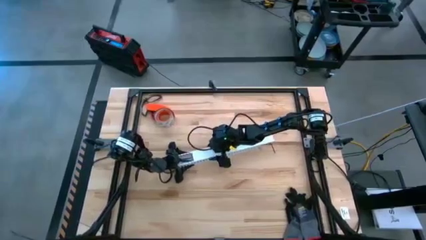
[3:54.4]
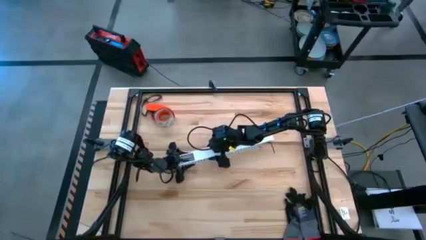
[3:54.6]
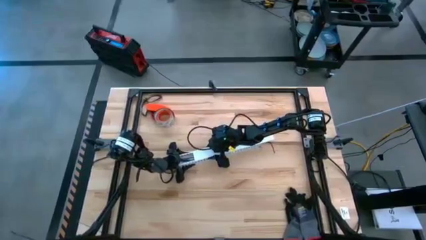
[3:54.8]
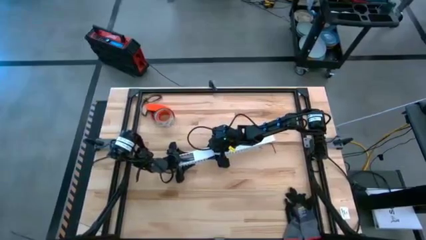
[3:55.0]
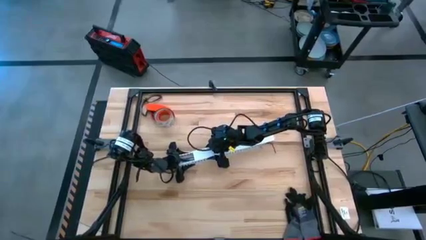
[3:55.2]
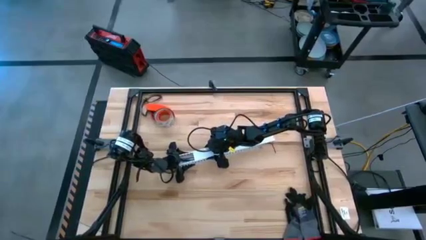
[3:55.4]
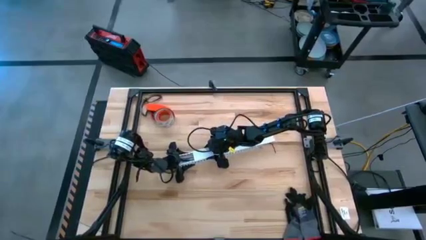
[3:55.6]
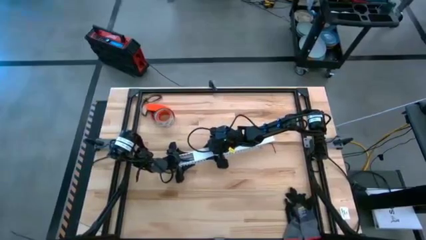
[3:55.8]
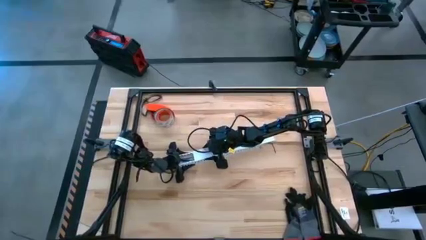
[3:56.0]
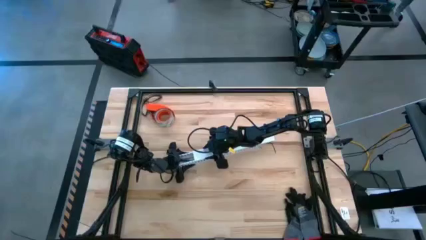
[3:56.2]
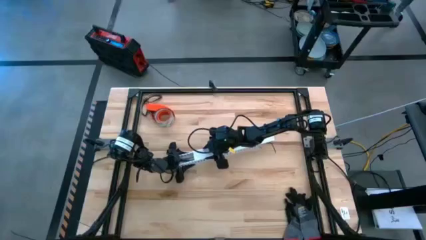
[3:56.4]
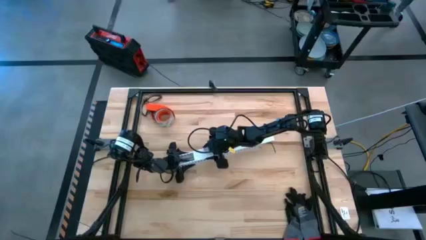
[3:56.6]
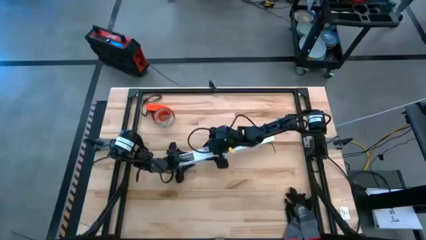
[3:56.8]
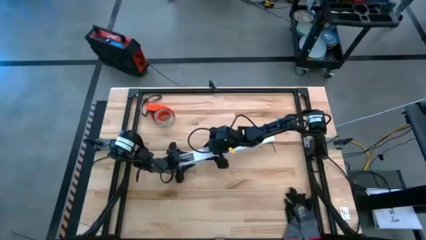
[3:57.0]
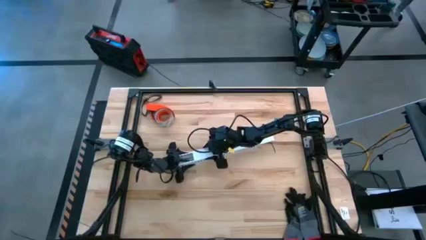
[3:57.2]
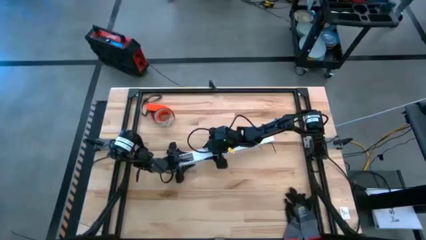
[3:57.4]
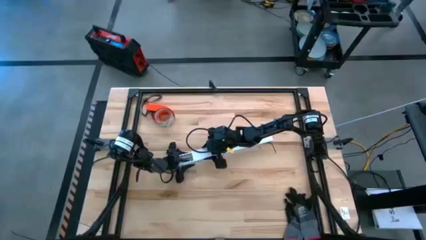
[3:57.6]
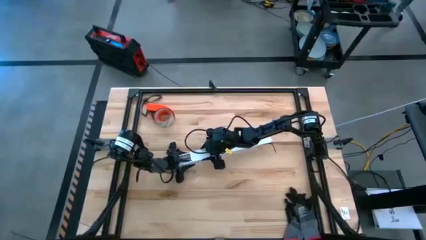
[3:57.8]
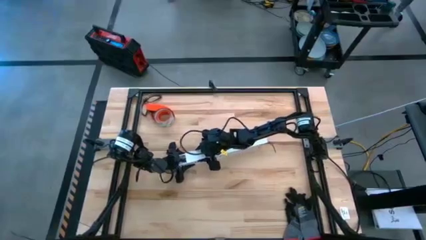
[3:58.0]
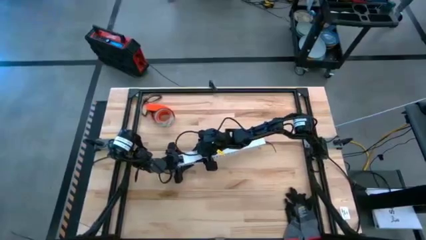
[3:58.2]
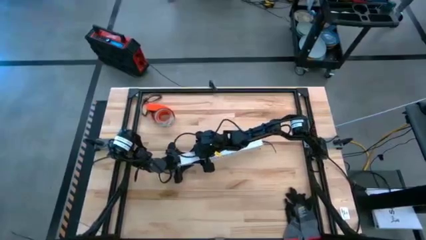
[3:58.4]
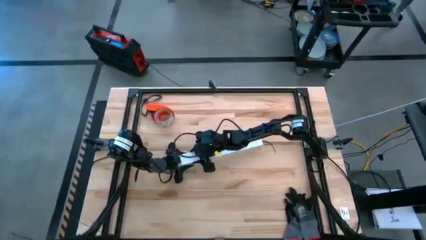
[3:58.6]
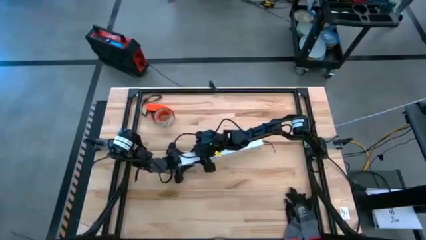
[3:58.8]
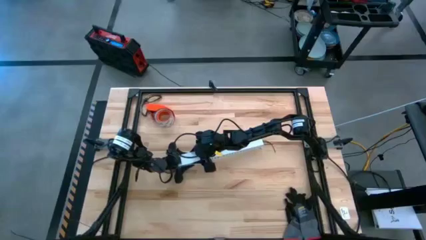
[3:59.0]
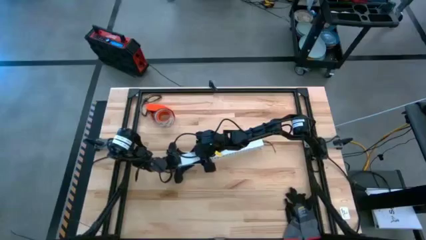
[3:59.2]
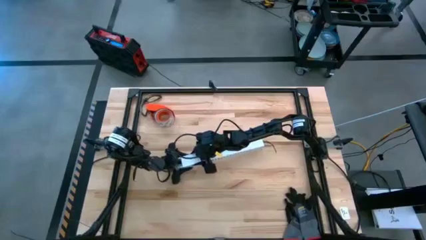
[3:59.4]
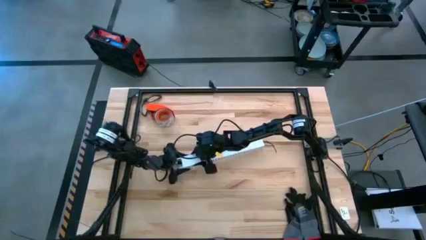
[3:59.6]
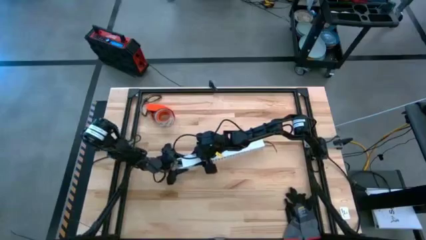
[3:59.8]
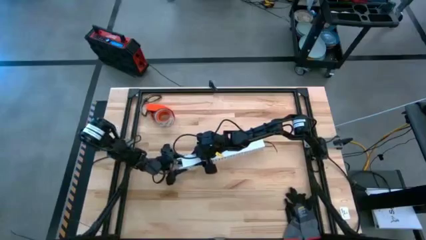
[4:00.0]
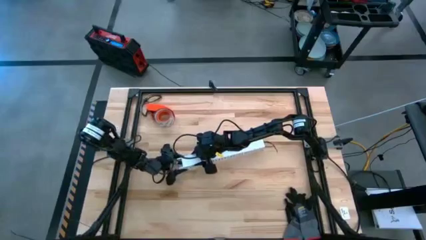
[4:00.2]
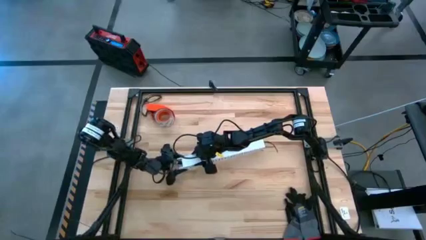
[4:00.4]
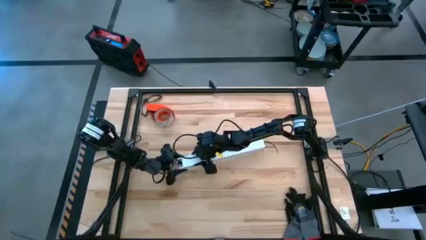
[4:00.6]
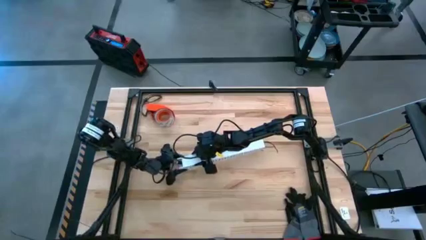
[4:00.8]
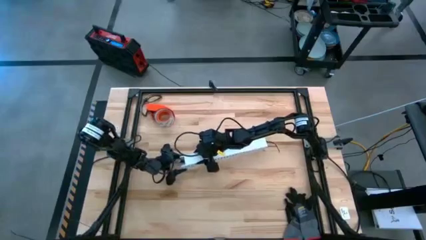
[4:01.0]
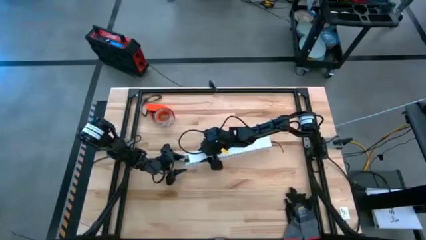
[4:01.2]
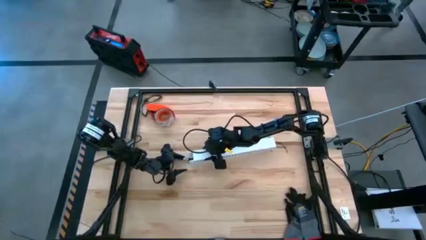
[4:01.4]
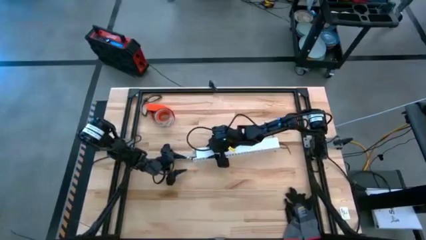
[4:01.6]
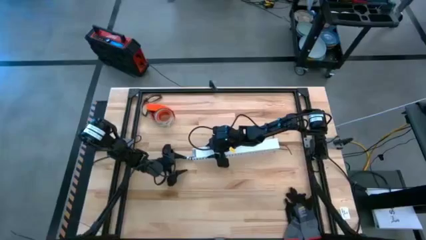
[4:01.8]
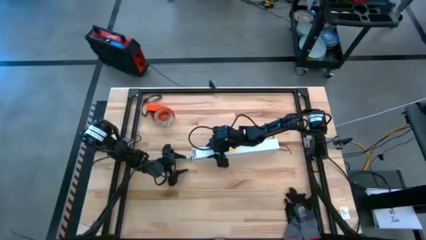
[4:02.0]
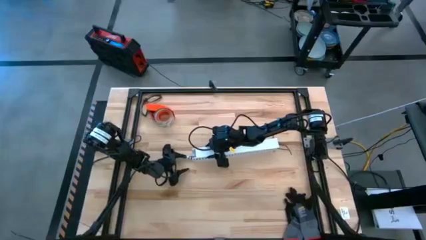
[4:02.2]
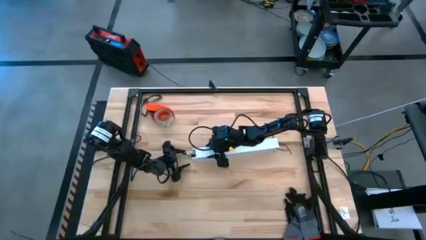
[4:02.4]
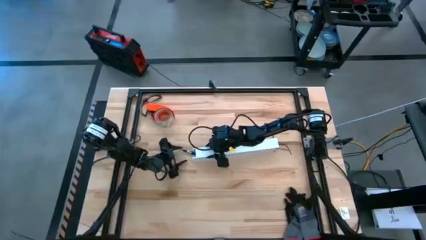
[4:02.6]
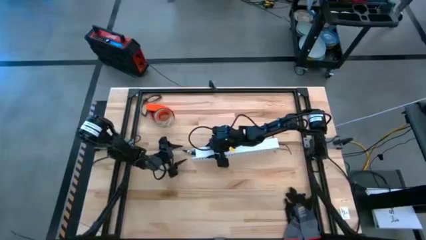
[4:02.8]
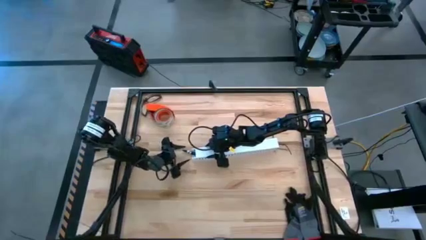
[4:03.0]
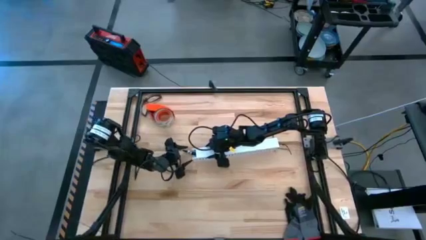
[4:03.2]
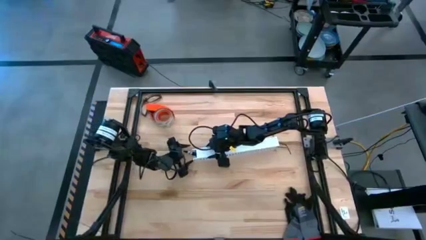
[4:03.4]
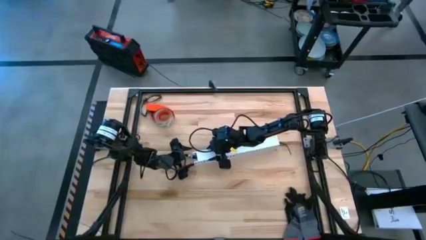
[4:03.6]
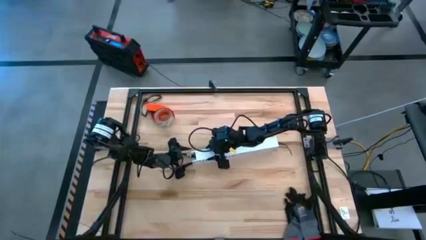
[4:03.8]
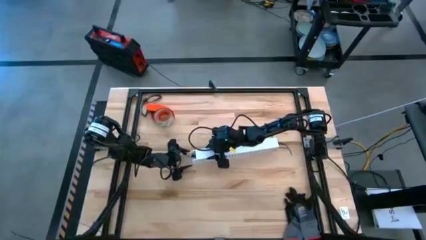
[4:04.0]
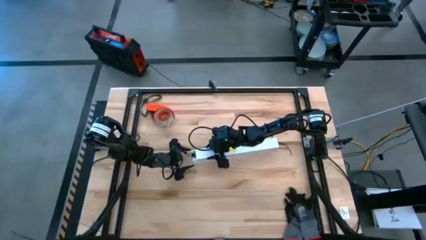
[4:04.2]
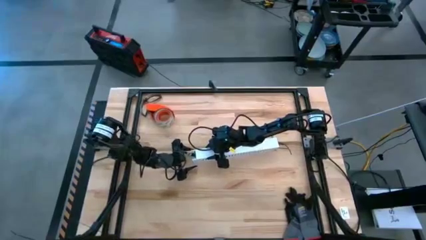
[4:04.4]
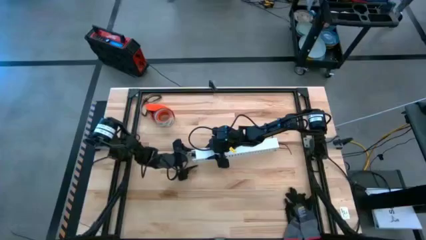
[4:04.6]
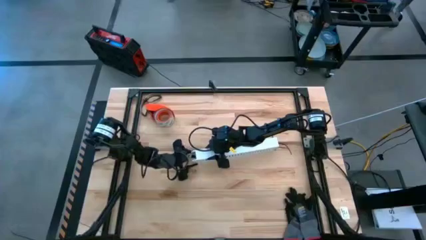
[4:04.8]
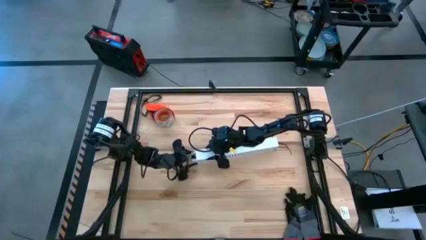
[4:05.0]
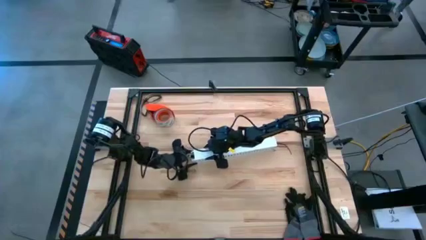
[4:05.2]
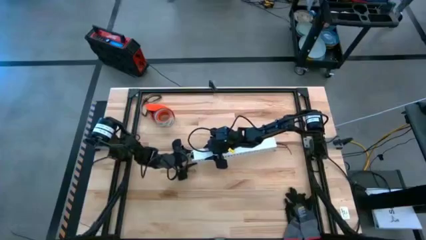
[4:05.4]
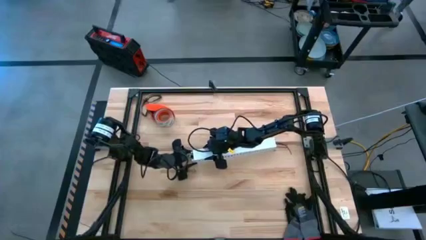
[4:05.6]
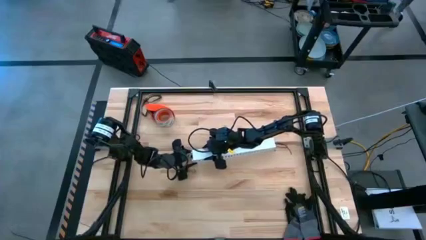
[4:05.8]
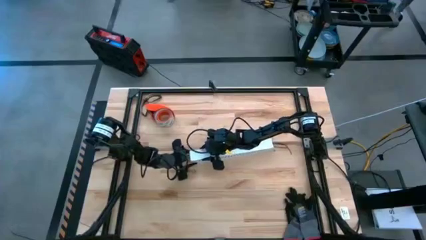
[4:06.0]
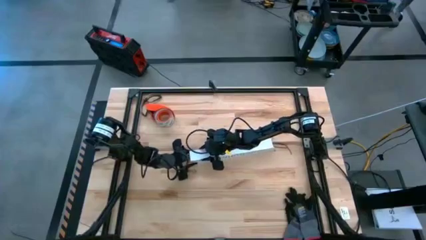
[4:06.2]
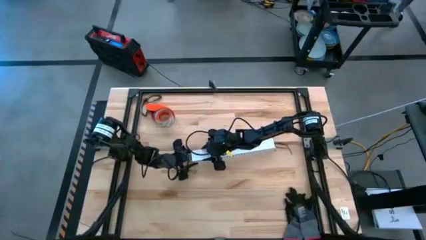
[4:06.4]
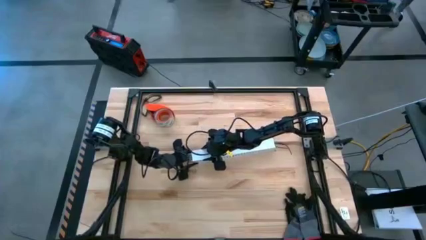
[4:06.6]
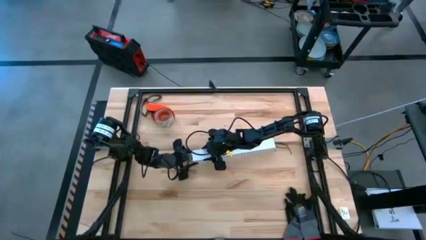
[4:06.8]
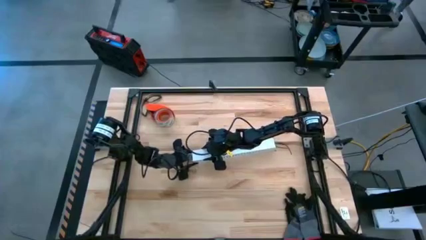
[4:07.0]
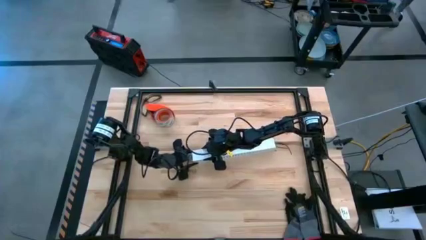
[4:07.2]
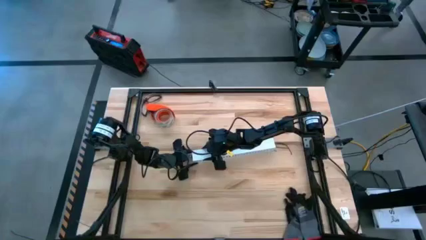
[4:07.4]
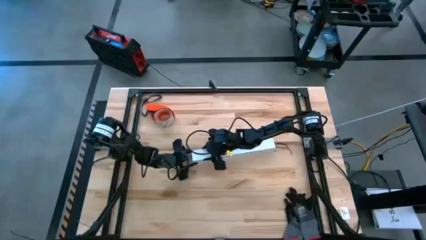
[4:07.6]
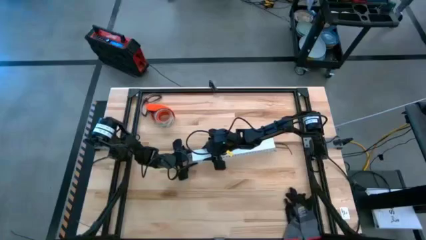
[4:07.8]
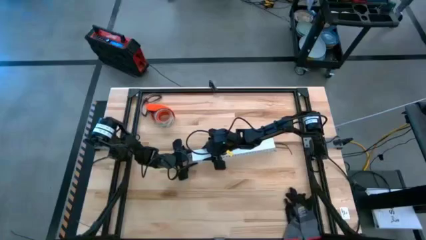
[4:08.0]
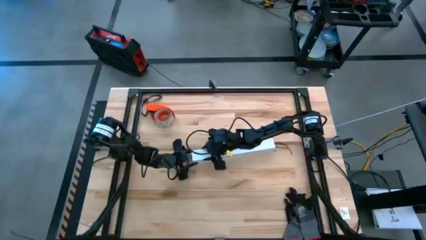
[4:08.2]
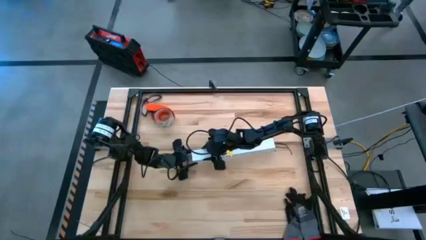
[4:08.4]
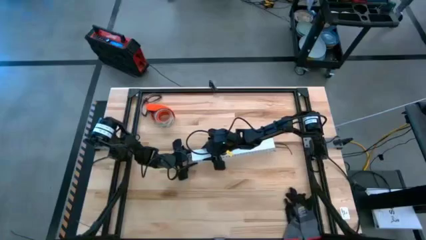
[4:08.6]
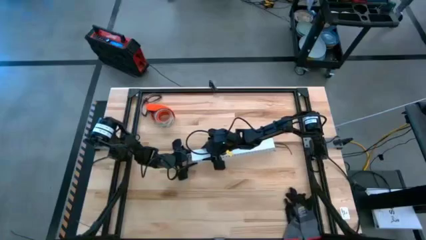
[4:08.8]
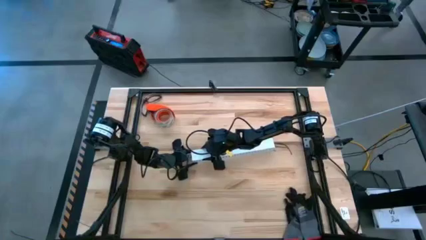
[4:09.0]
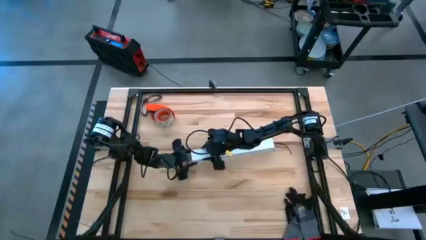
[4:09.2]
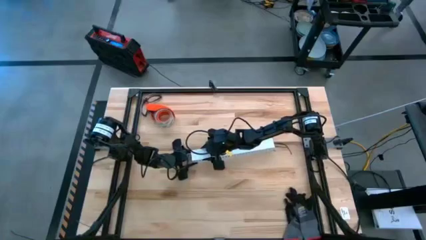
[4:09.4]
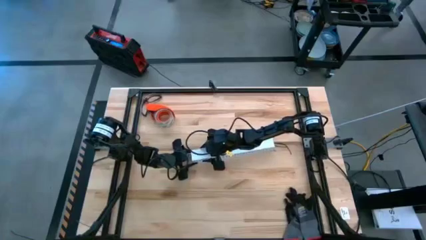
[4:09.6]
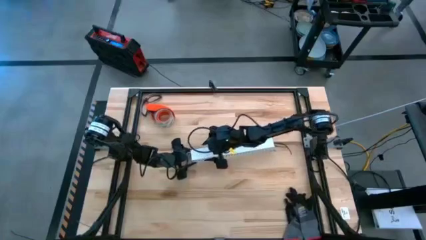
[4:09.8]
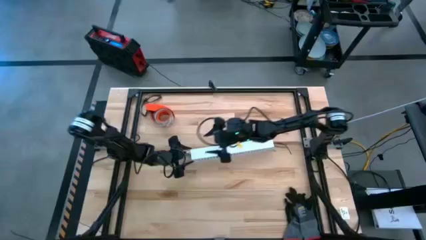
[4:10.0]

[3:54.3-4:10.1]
Task: Ziptie cables
Close the white cable duct
